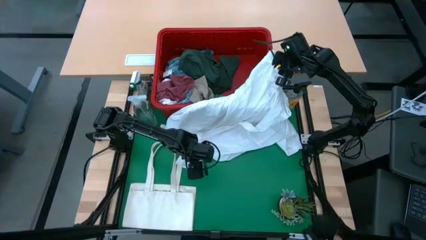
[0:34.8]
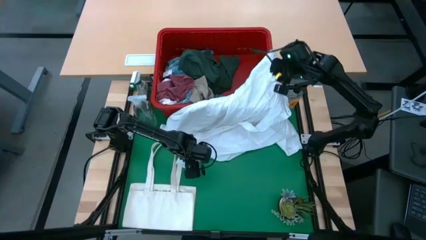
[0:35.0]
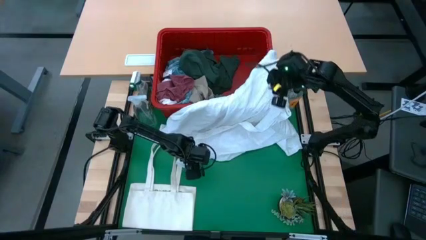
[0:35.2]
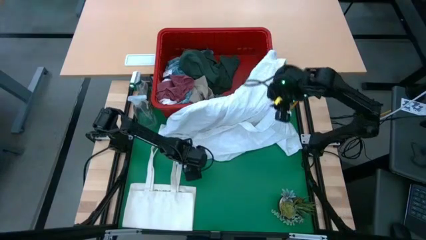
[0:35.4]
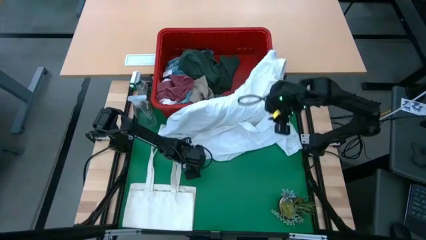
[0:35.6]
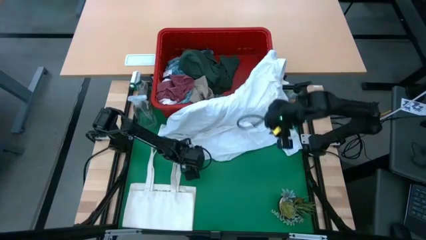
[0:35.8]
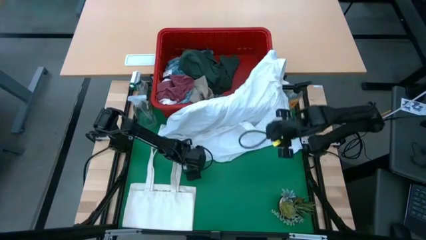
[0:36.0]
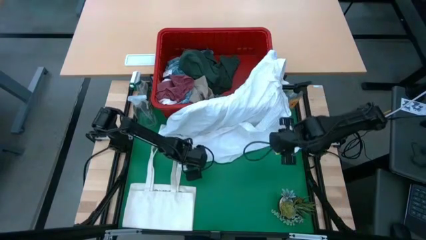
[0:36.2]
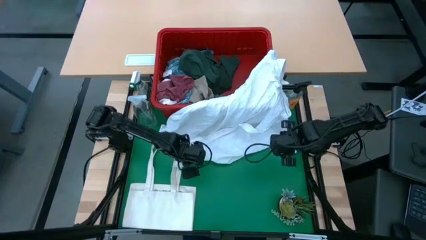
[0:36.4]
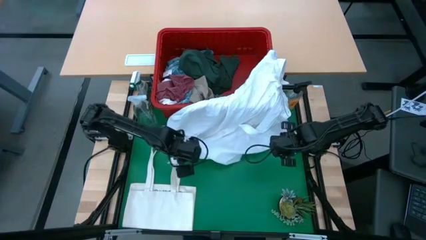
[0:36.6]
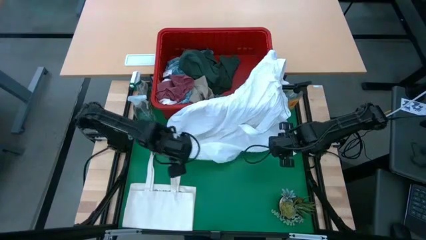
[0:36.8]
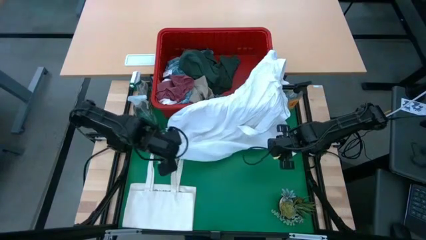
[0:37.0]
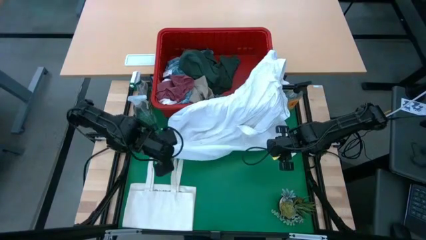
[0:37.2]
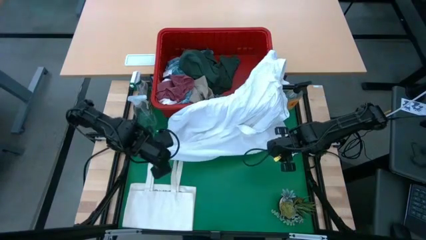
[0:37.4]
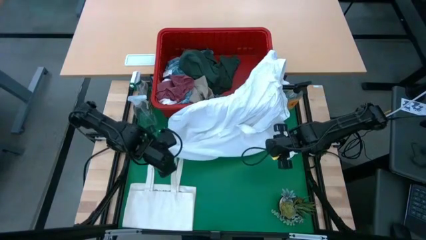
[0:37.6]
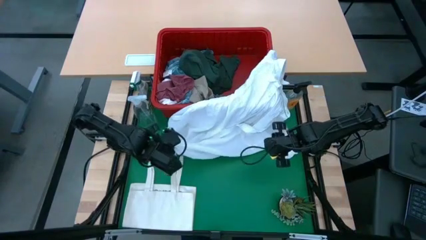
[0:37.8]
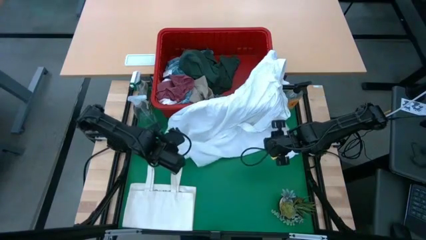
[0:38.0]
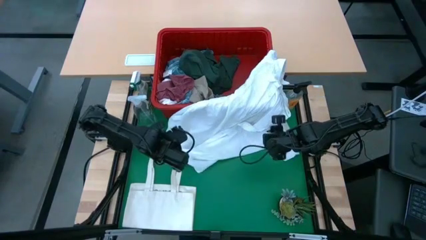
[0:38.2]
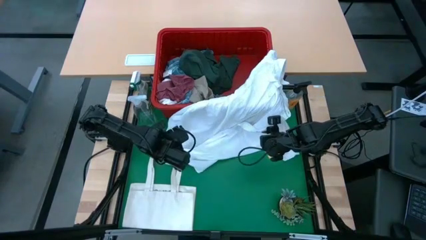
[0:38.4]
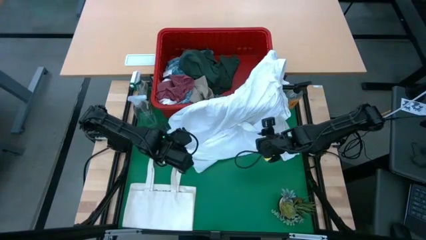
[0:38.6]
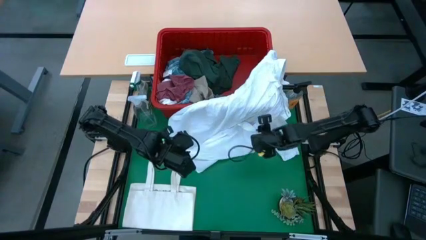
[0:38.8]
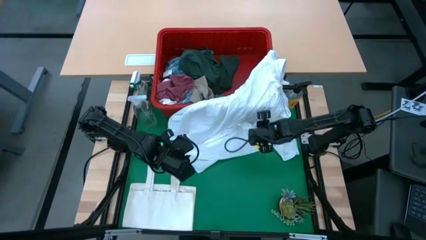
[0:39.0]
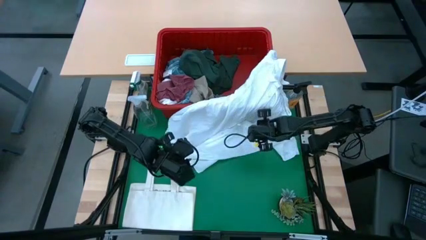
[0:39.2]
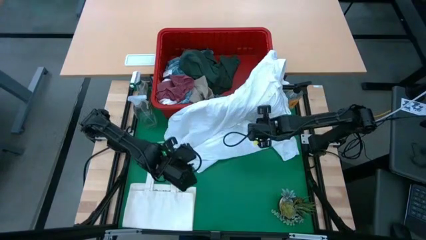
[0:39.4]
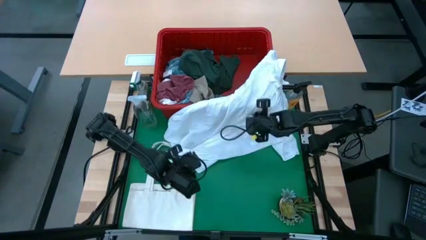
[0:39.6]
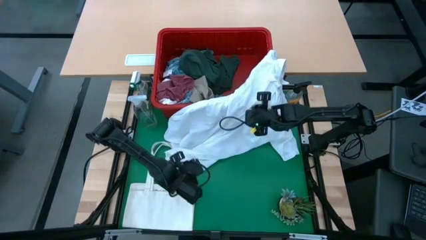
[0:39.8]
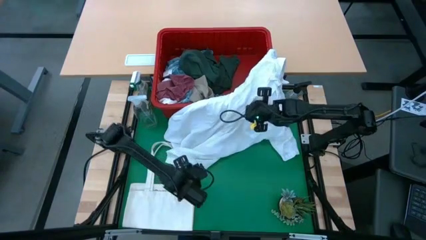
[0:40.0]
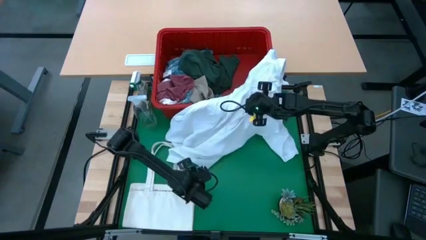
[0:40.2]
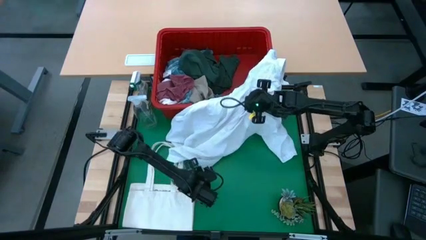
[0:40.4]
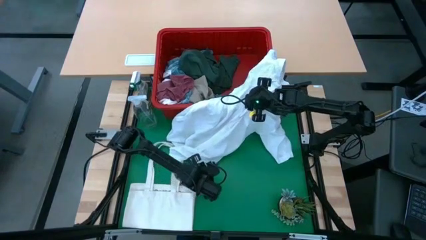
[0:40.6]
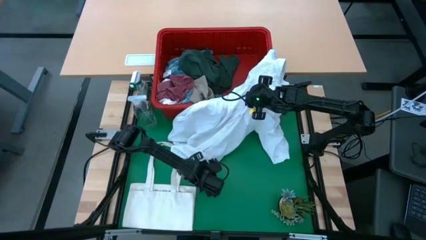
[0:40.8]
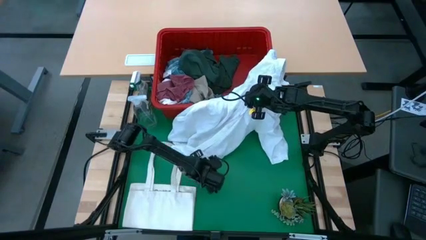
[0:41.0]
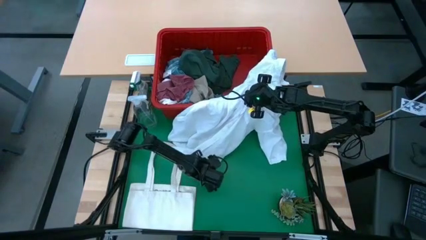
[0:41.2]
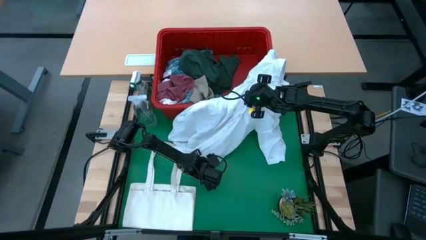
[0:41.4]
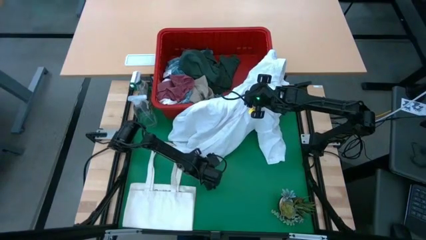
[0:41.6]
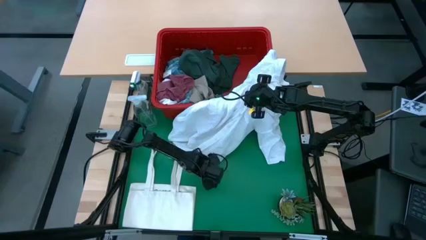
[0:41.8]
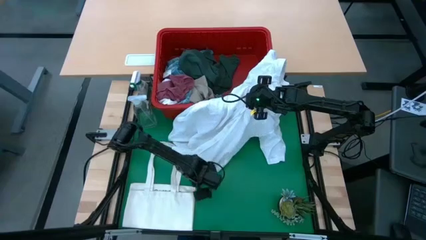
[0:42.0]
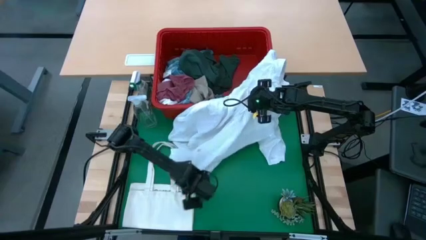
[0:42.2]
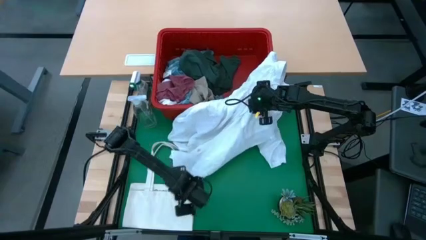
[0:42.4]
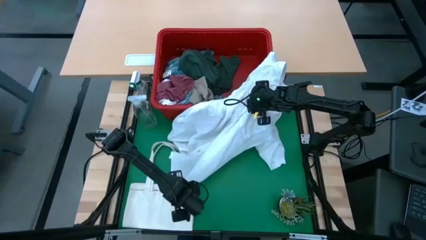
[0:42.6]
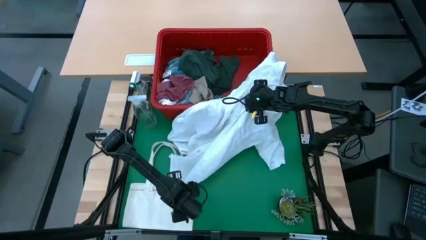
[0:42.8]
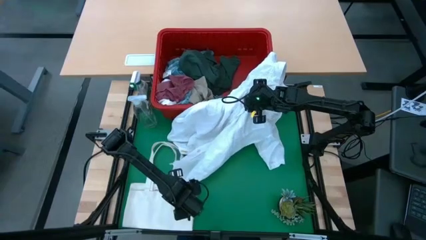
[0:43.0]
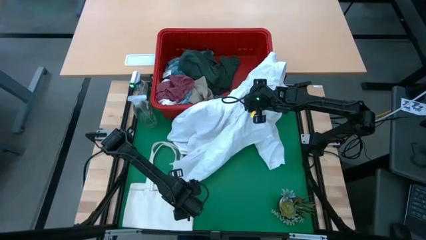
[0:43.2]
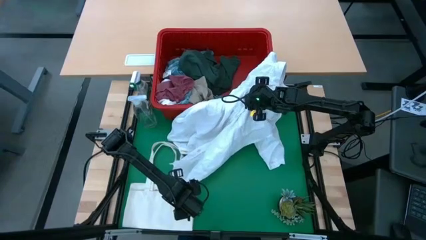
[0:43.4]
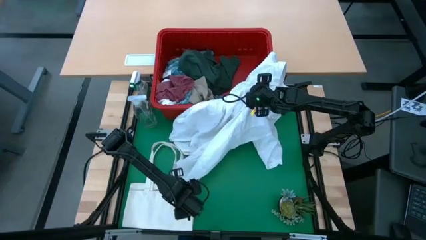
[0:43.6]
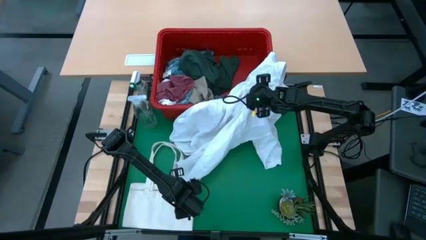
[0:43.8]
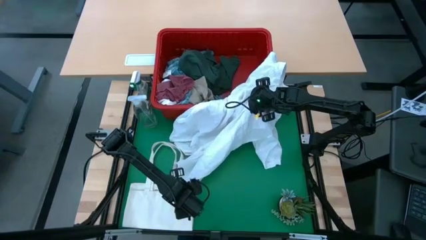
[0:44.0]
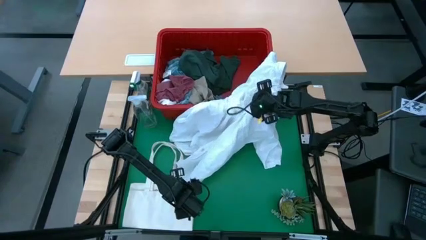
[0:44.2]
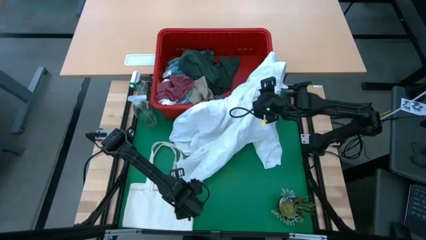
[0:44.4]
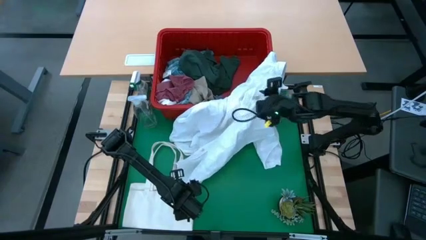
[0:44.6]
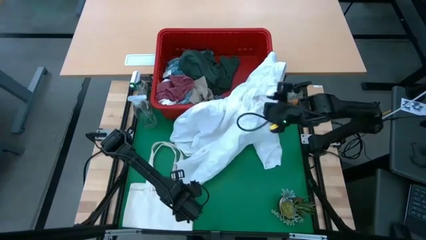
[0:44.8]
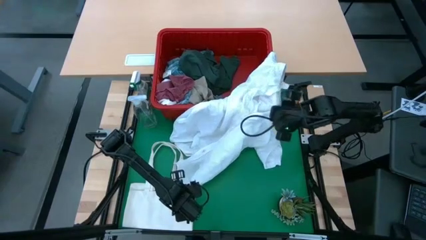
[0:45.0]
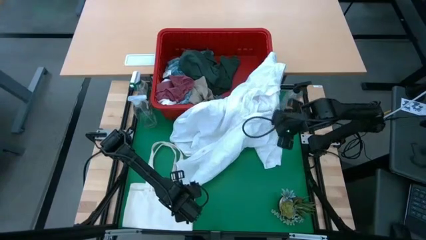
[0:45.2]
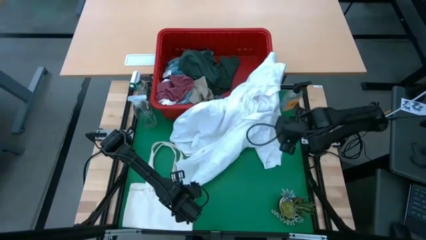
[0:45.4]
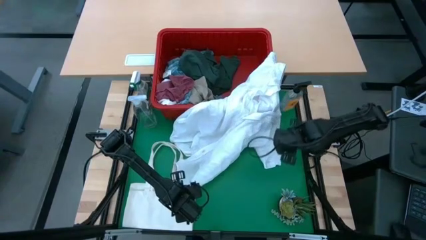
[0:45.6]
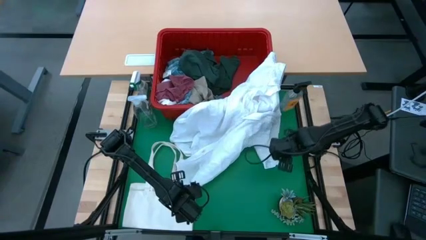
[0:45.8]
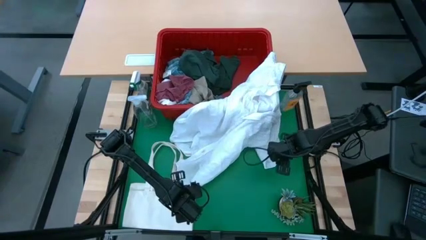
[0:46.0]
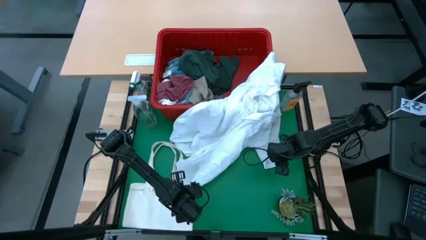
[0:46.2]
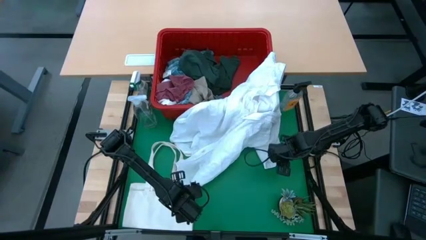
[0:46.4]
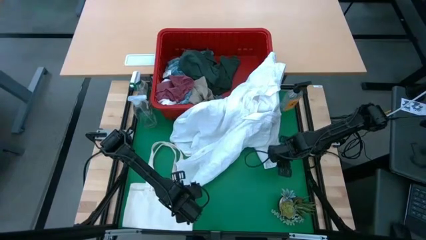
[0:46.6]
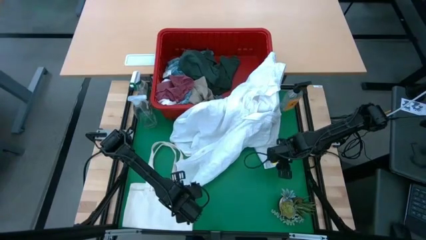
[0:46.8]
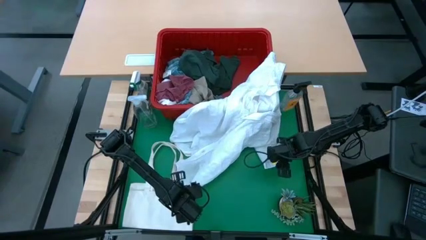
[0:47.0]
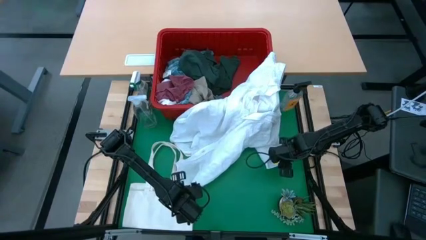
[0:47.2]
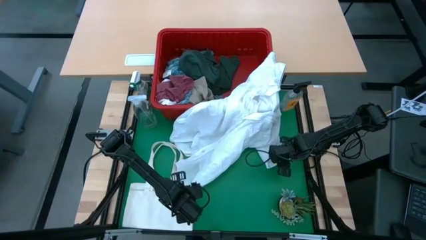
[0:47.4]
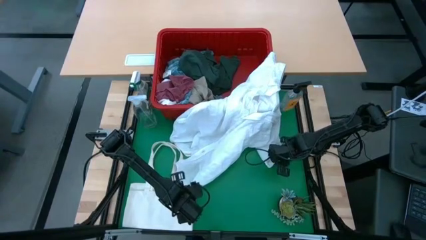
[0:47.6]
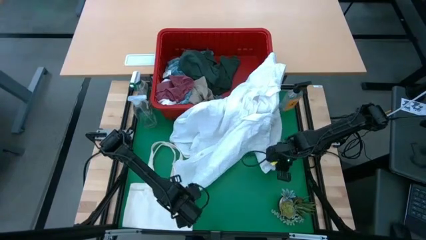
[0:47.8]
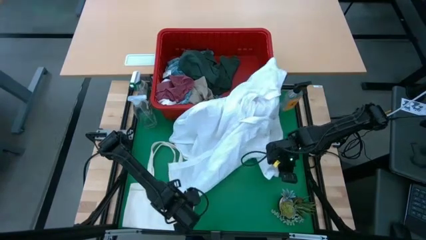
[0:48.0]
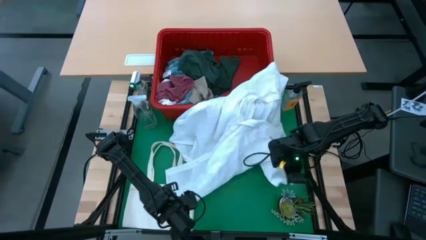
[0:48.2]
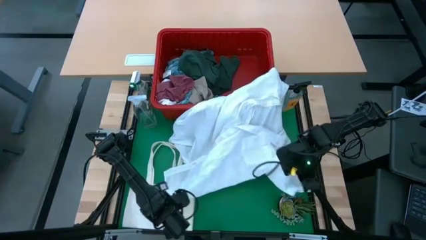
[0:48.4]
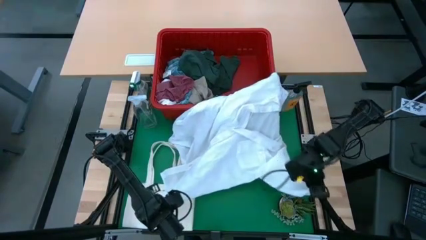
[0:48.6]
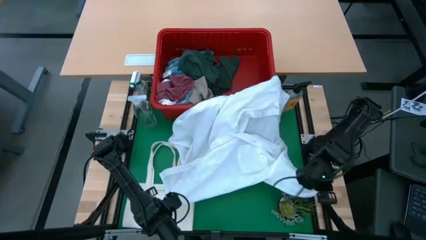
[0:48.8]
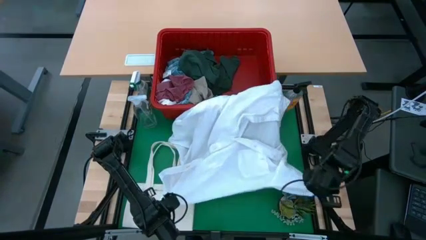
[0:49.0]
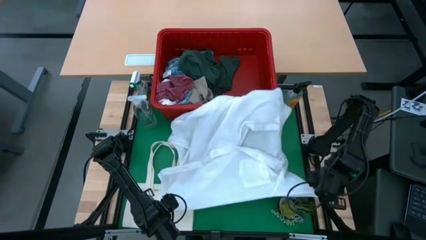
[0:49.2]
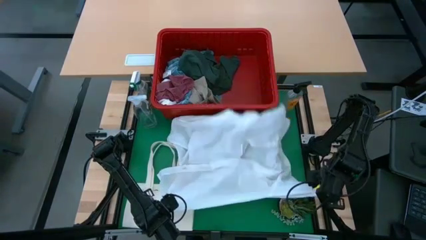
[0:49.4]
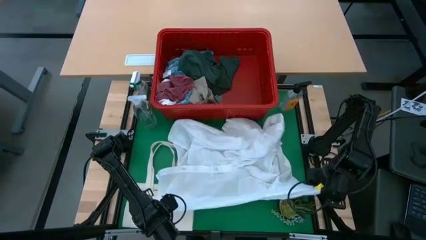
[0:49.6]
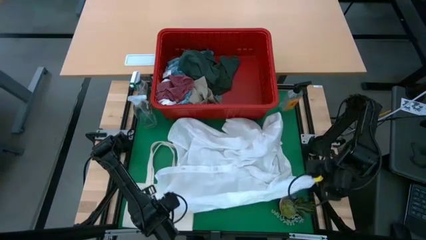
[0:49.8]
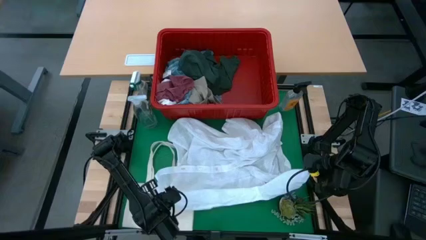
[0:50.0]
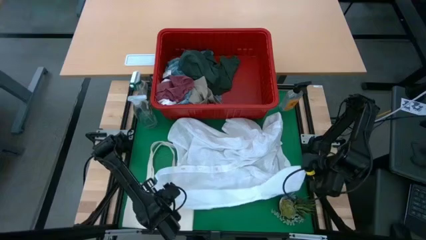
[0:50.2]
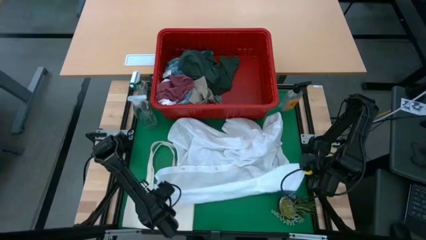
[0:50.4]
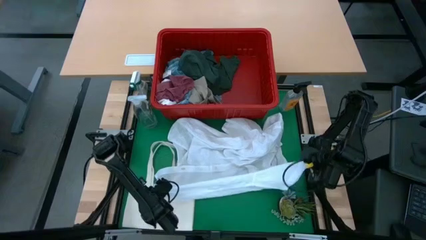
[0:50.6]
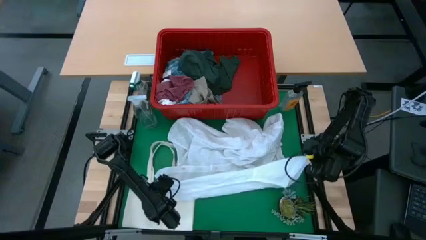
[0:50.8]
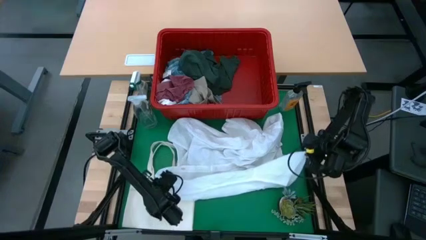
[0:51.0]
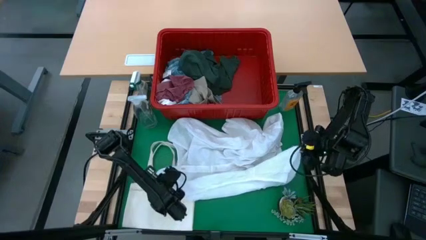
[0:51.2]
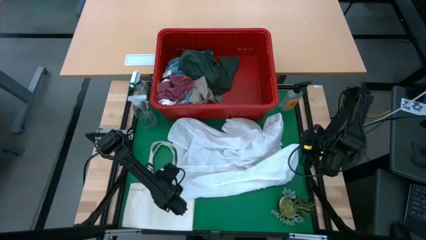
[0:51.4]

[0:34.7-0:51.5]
Task: Fold Laundry from Bin
Fold the white polo shirt
